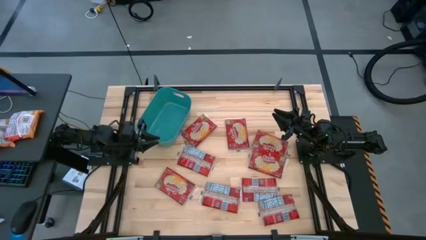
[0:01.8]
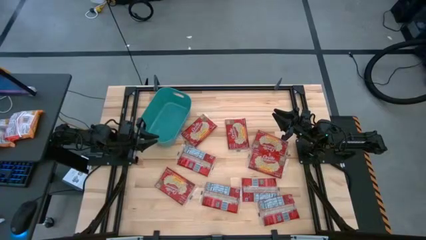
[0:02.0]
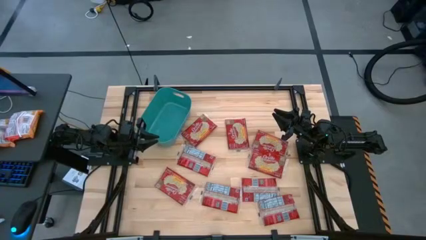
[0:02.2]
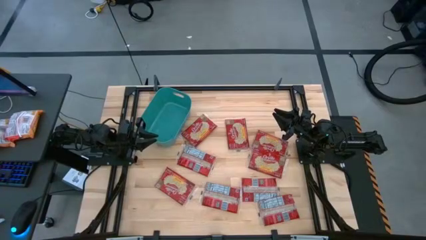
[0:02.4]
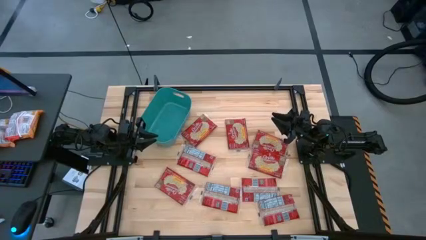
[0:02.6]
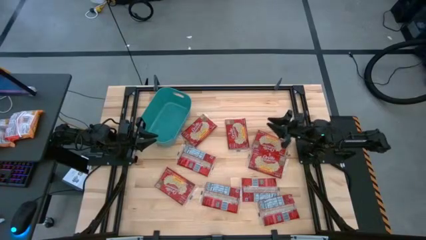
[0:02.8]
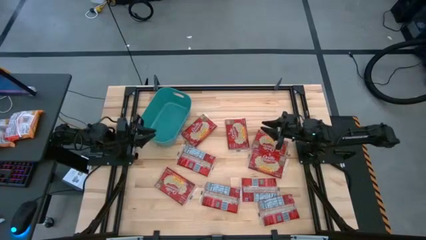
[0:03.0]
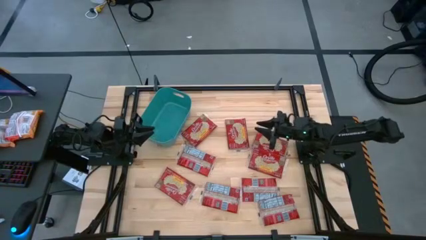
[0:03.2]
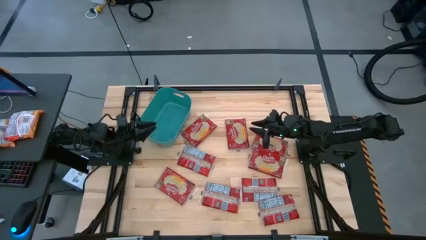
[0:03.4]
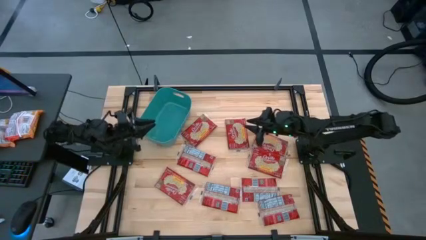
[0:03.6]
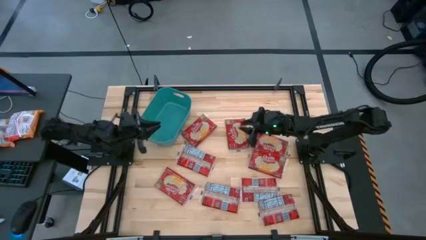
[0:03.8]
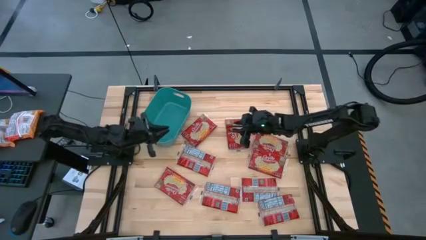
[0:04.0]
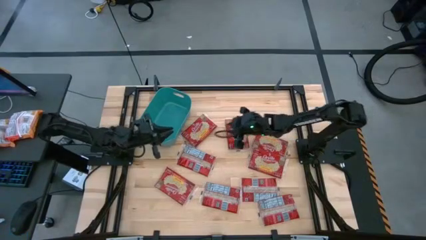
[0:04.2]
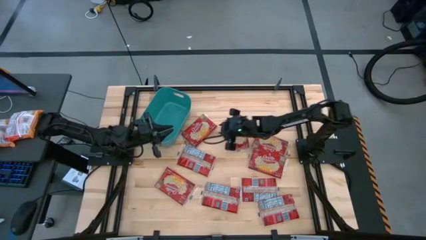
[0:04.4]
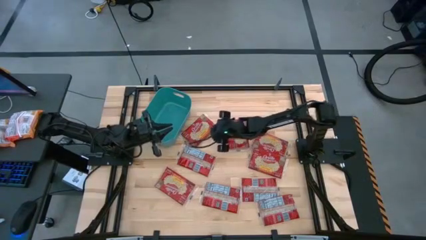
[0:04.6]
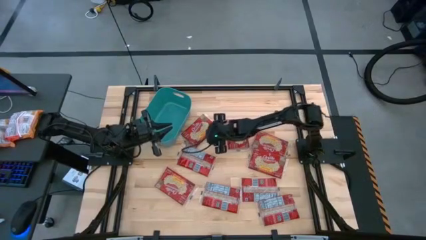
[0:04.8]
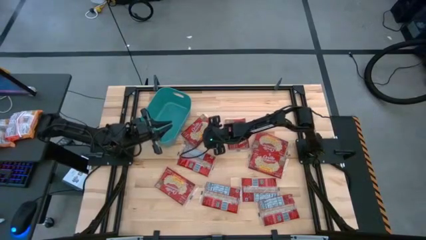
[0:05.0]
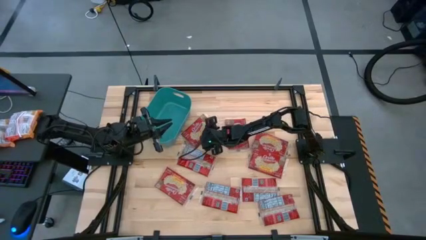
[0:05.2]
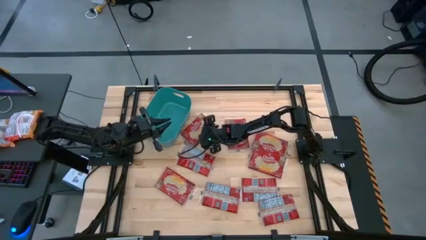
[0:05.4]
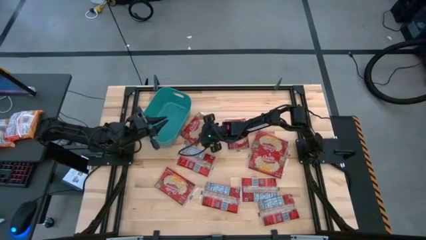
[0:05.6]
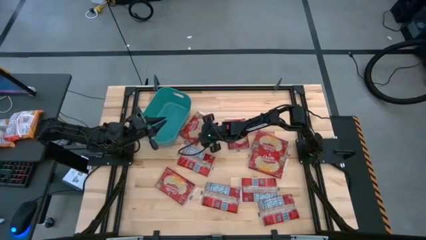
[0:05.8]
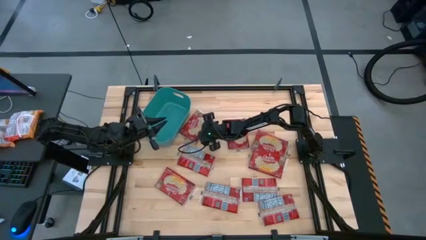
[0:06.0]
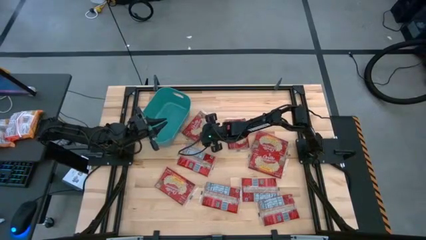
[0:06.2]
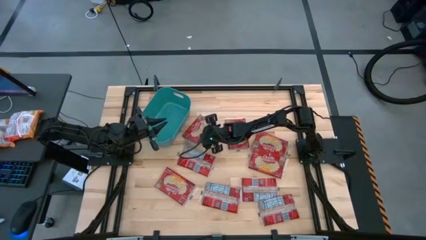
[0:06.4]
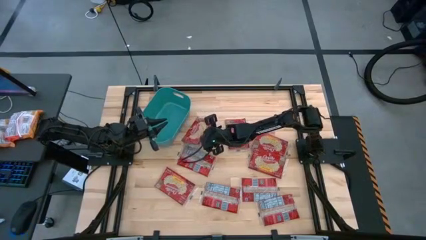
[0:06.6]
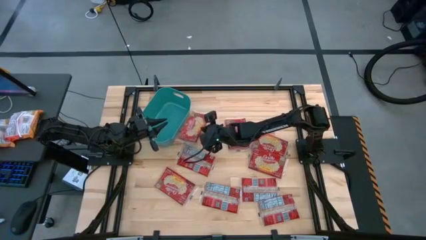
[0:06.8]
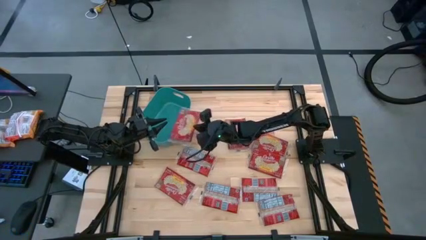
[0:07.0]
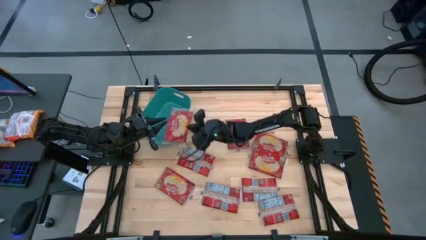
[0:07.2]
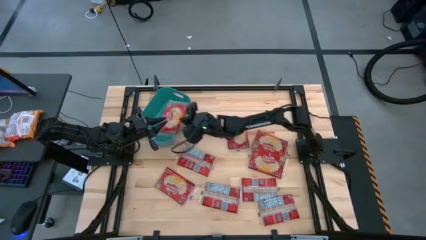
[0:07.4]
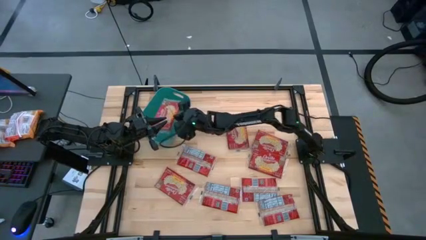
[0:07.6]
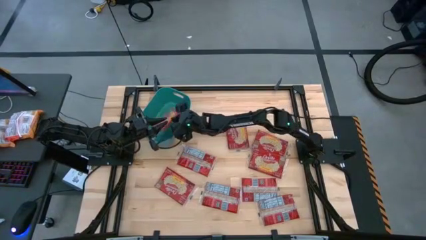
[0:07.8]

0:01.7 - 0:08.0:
Task: Sort popcorn bags into baskets
Put the red popcorn bag into the green bin

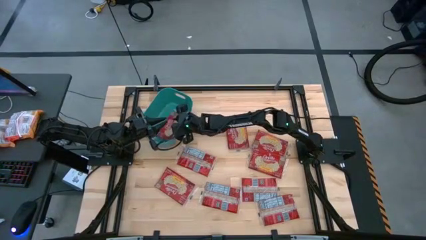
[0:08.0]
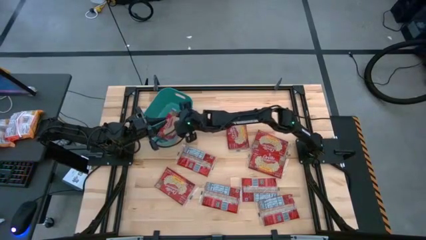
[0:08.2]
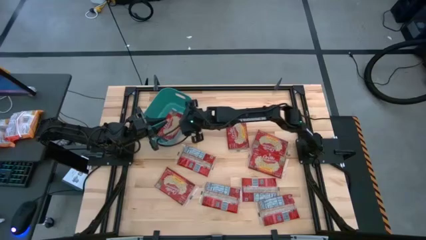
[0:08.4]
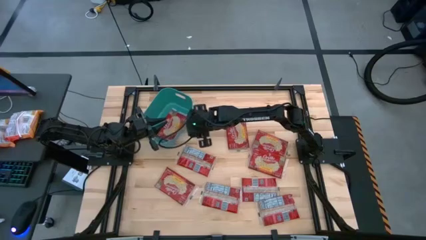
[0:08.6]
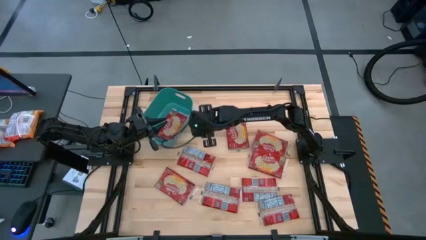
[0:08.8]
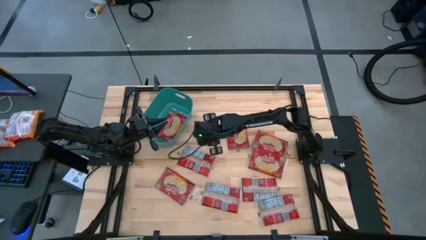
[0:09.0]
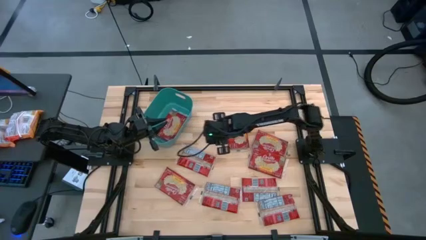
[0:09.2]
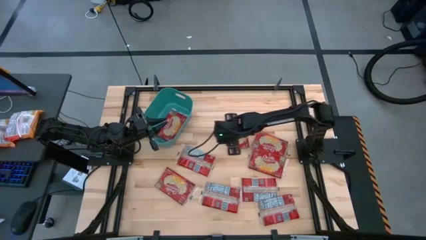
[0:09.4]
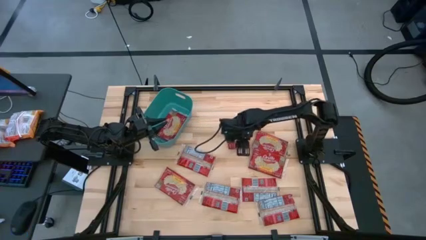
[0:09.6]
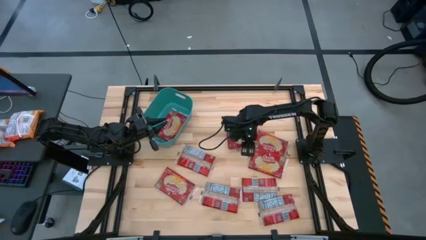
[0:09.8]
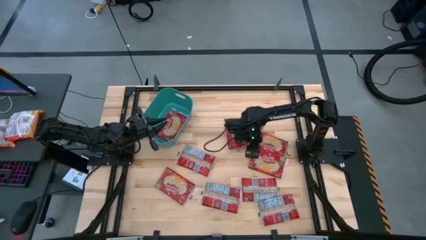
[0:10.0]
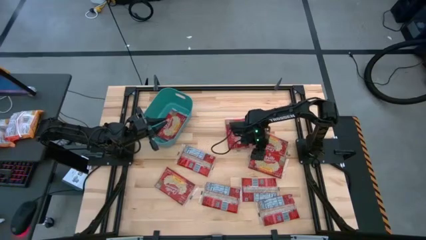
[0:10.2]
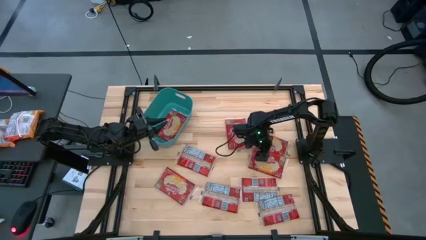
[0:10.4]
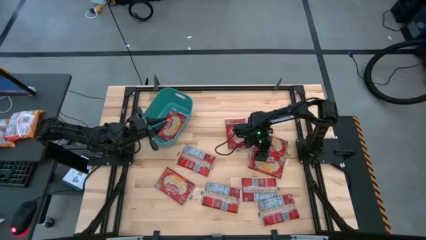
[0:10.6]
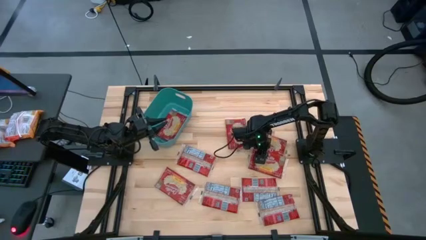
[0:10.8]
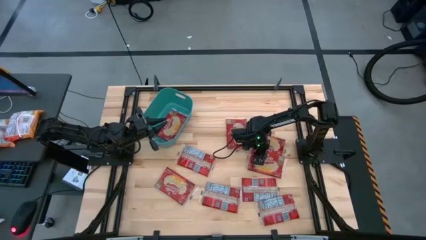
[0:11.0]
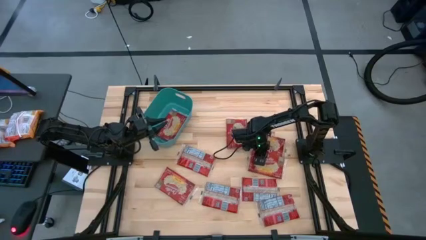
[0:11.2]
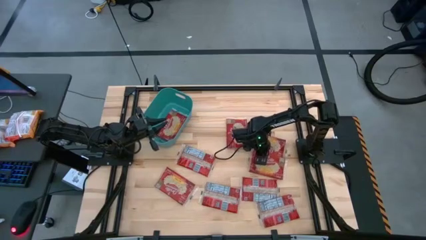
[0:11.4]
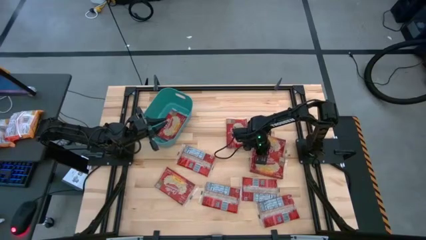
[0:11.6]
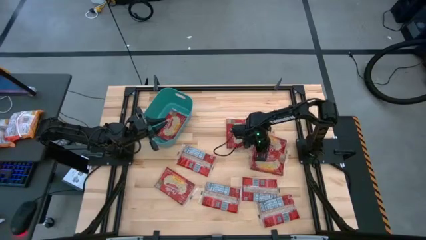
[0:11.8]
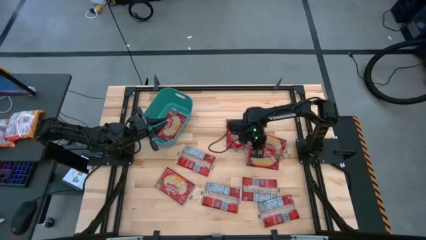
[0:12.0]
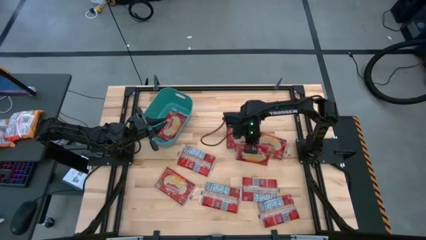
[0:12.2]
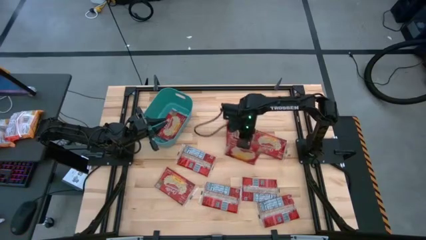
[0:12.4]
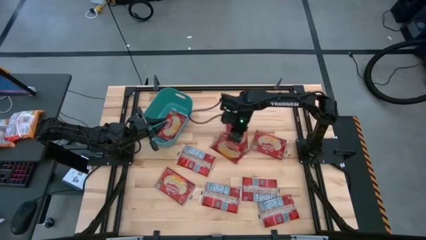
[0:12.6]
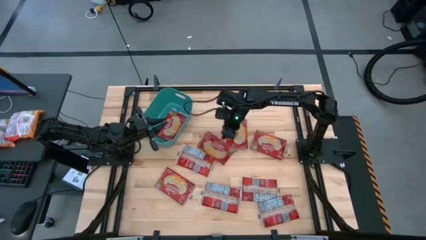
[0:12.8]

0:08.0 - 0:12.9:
Put the red popcorn bag into the green bin

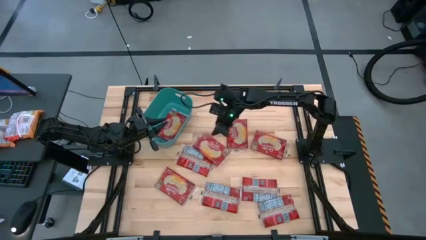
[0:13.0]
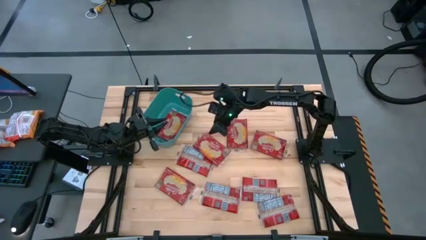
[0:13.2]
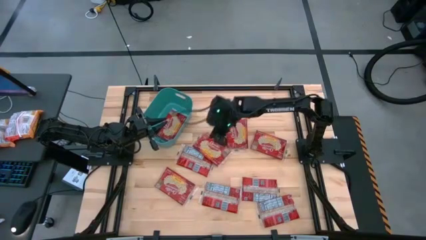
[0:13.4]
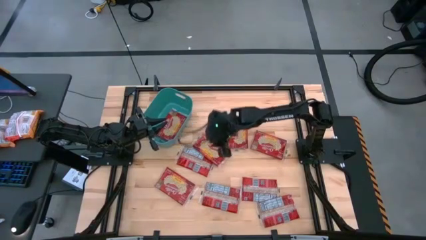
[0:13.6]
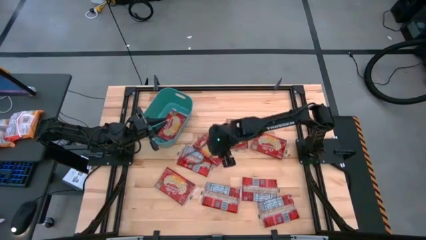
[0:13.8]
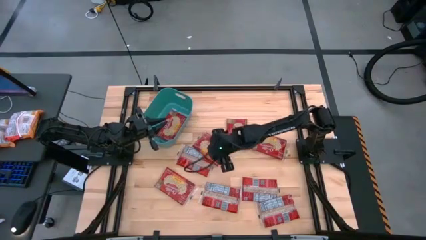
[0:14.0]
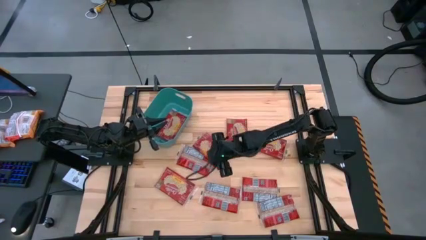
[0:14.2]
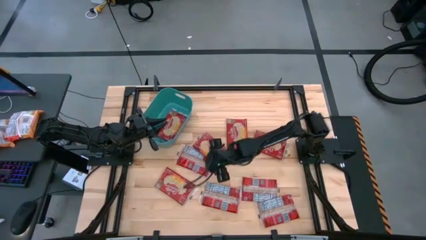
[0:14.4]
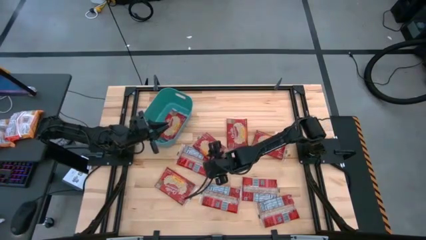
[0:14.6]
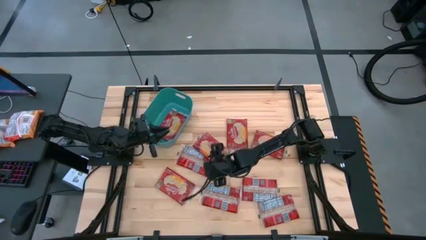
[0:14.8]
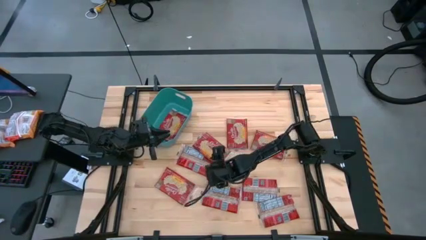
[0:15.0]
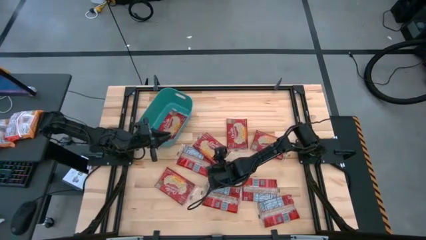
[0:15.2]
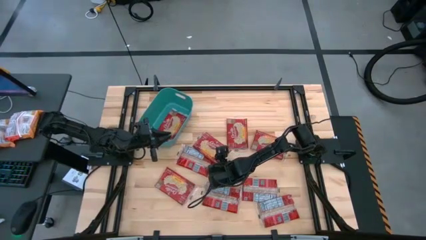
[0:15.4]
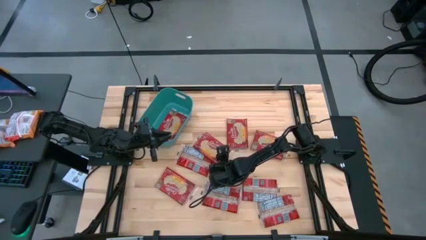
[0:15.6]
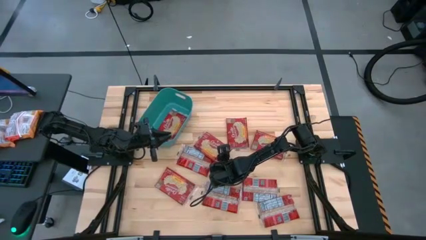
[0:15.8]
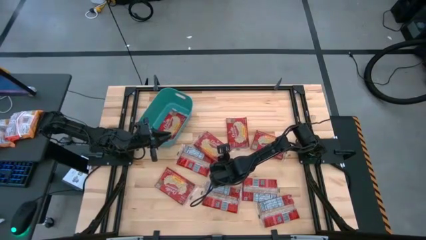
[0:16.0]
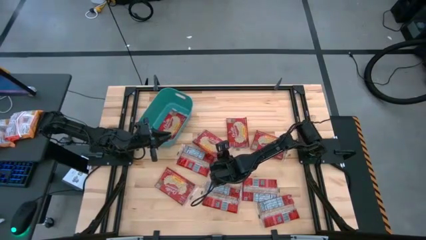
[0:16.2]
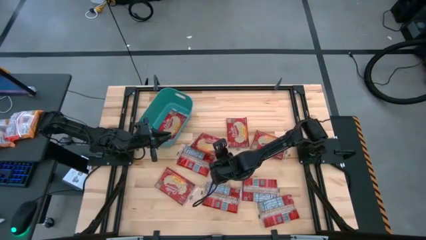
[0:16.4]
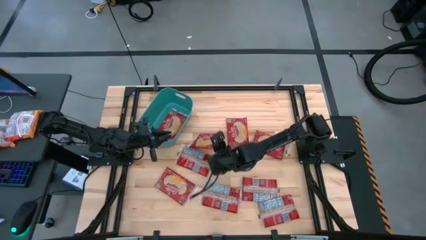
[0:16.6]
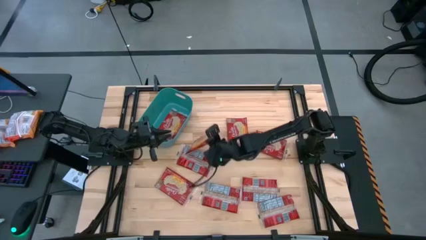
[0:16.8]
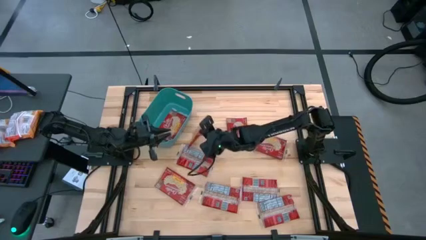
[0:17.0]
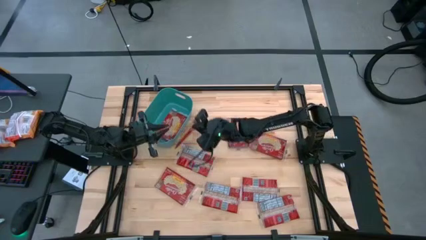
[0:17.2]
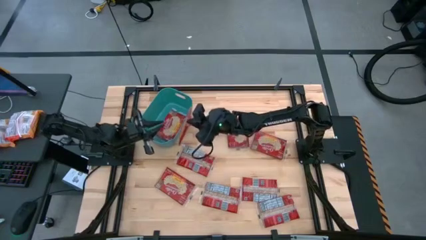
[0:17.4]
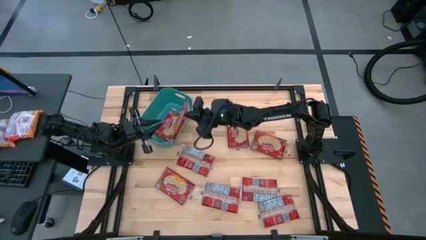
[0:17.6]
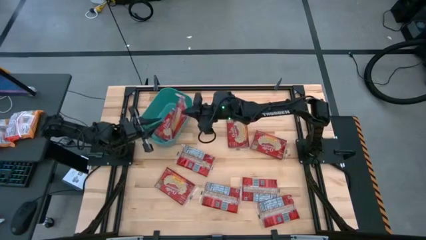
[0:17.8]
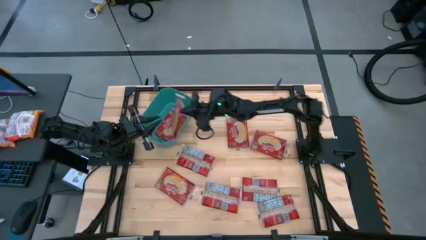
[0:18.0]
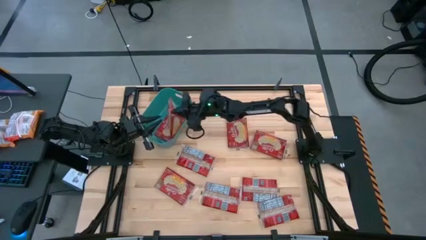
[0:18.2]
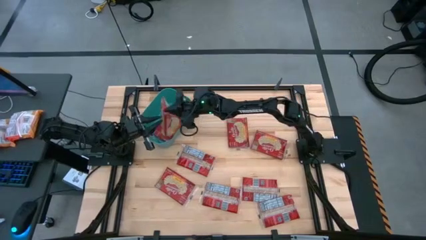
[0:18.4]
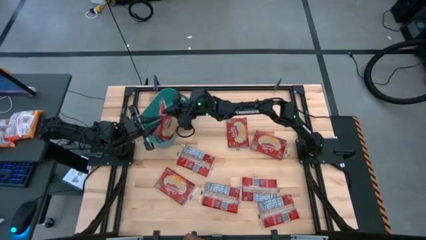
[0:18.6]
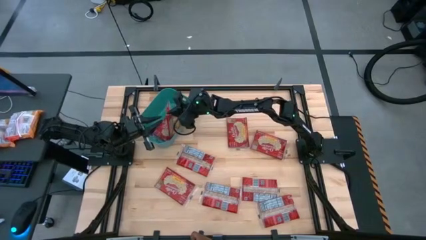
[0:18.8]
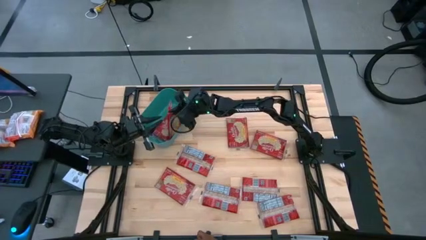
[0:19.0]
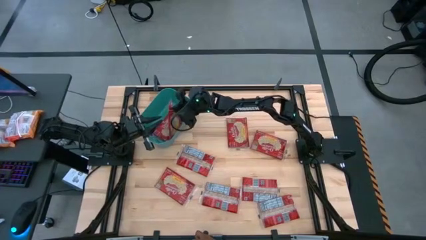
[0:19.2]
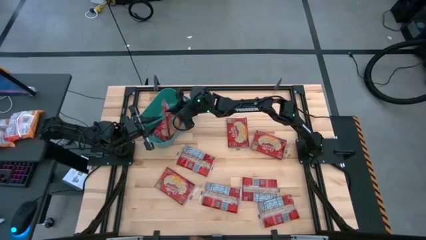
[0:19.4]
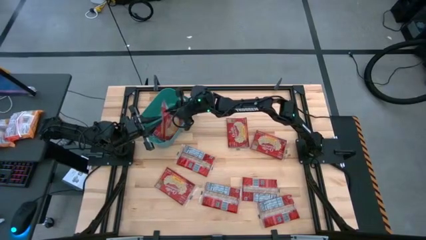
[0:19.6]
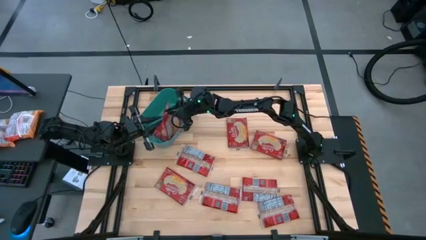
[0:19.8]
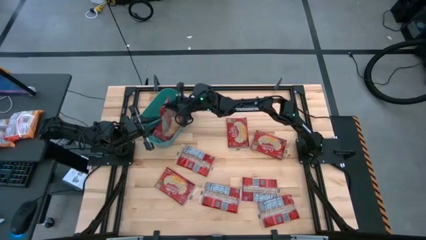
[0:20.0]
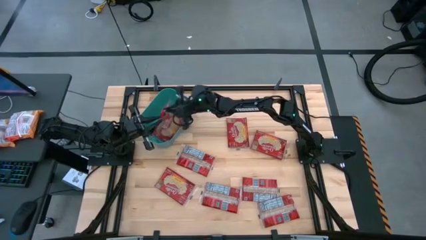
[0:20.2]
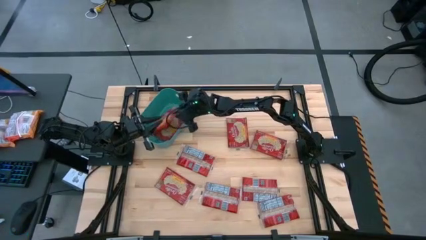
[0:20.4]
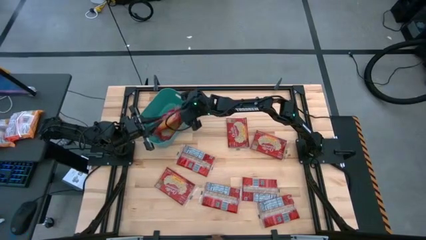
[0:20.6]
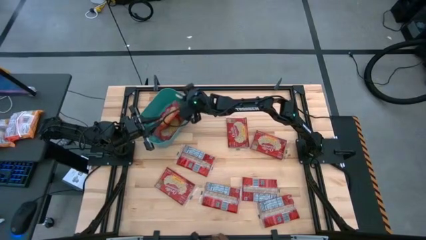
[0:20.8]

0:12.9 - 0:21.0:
Put the red popcorn bag into the green bin
